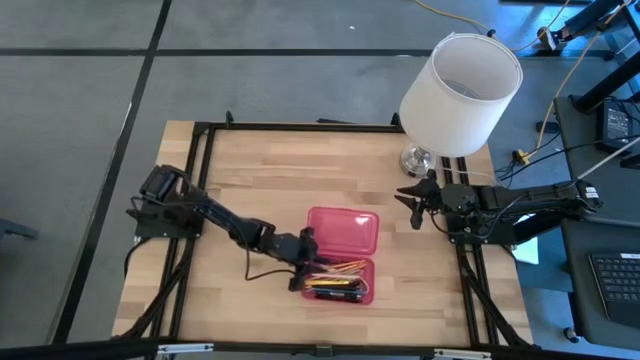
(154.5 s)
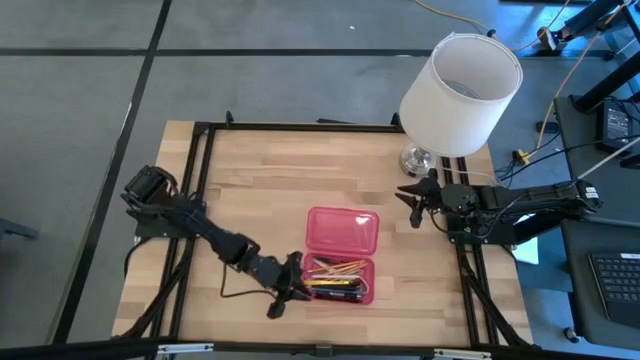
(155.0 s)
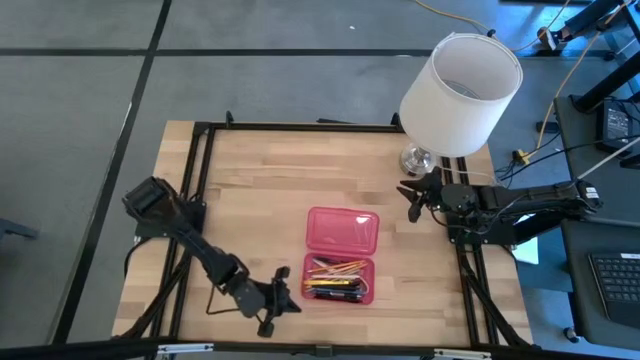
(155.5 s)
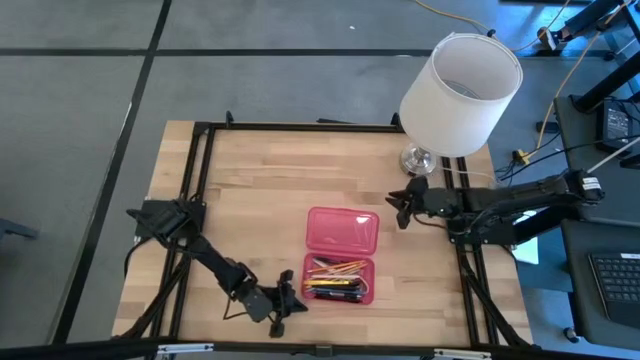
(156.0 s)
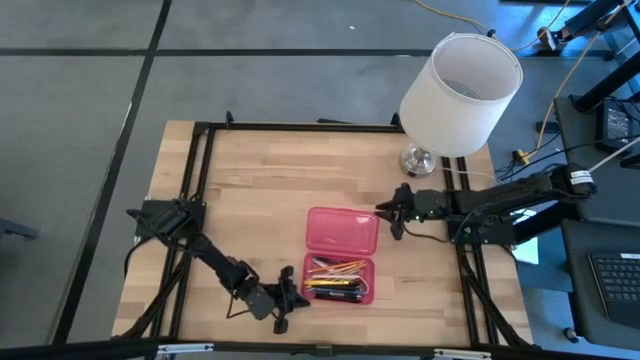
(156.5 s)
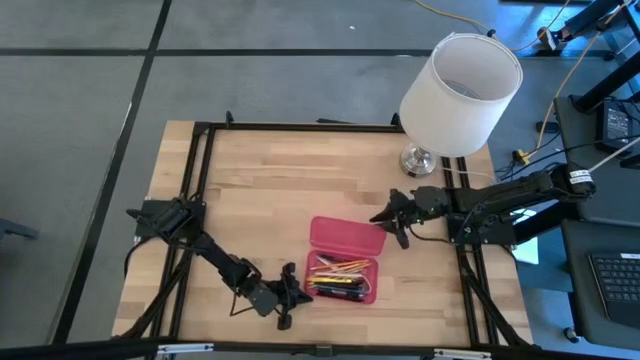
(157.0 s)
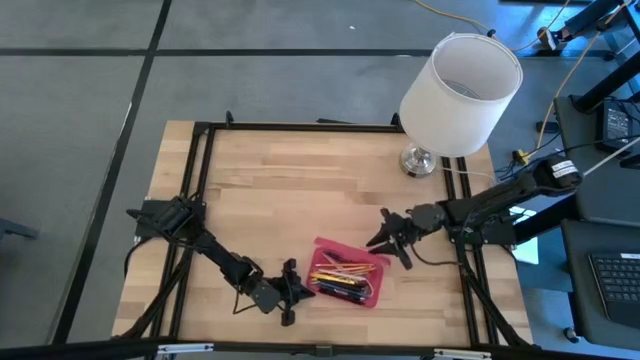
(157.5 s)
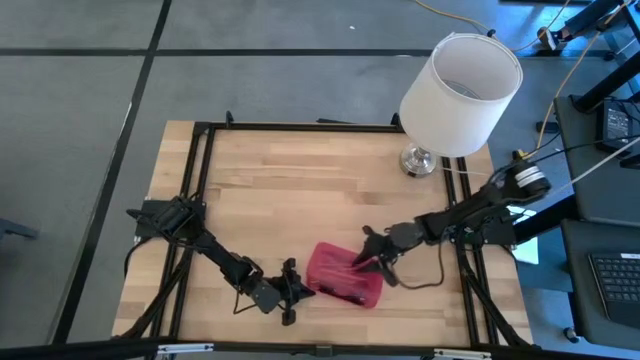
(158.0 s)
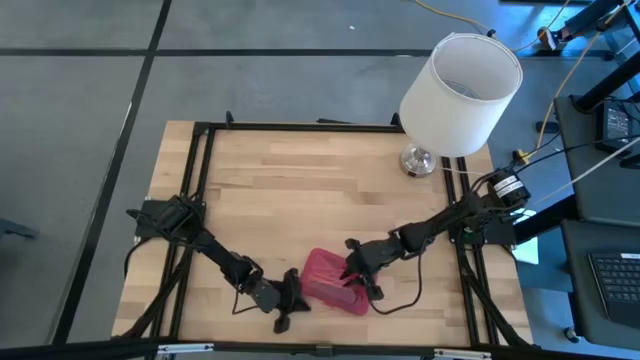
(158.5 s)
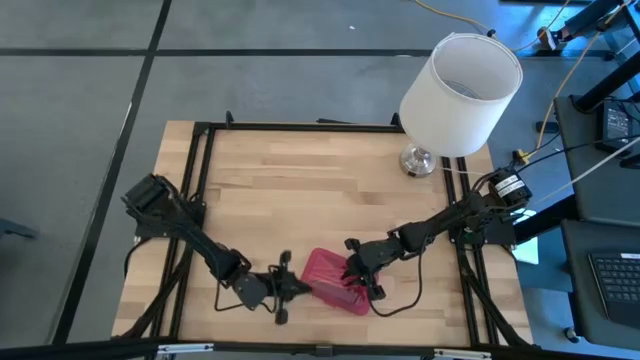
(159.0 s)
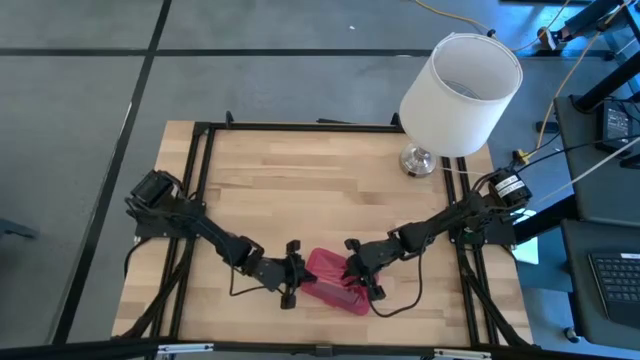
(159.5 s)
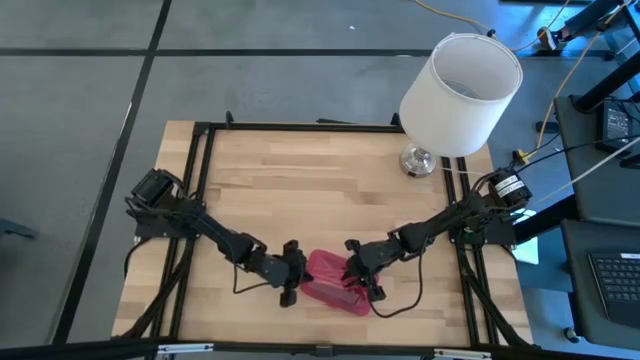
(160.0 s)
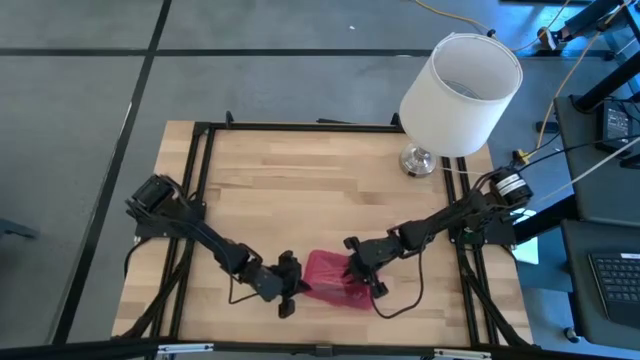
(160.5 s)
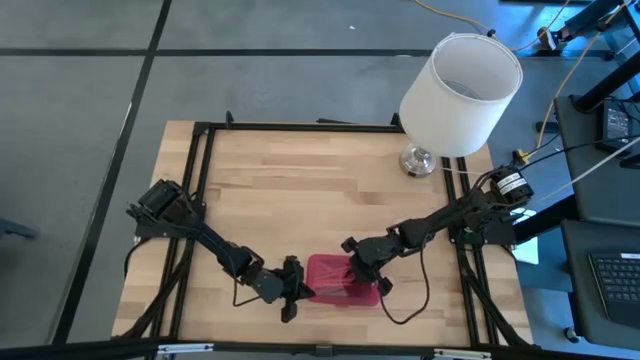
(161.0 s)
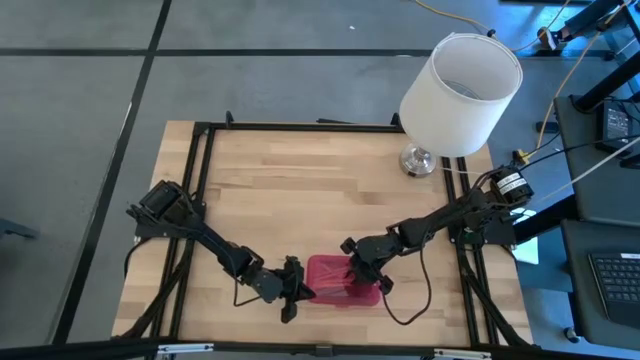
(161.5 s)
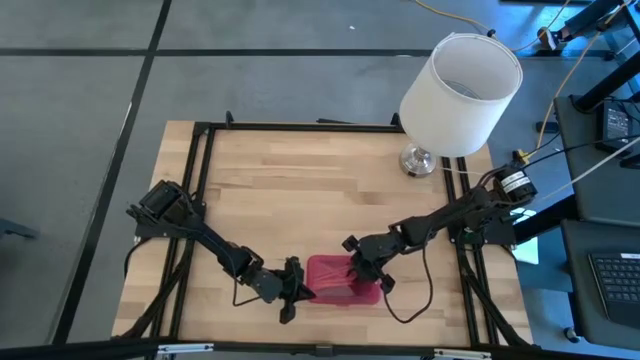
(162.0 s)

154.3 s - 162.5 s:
Task: Pick & place school supplies into a supply box
Close the red supply box

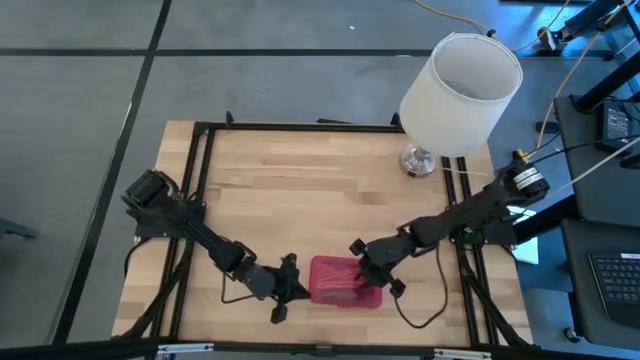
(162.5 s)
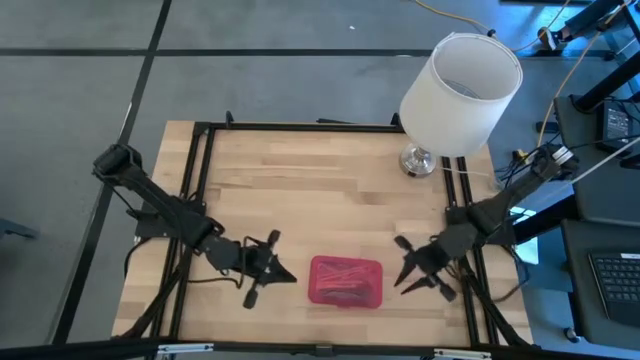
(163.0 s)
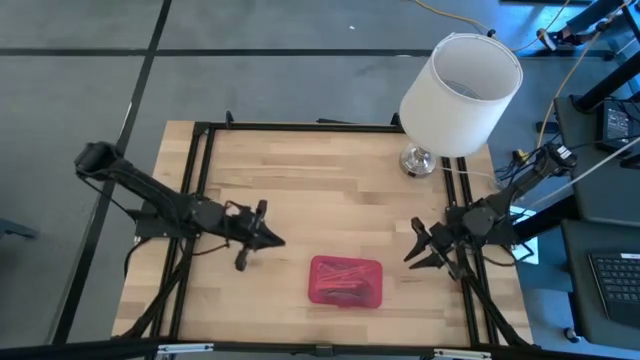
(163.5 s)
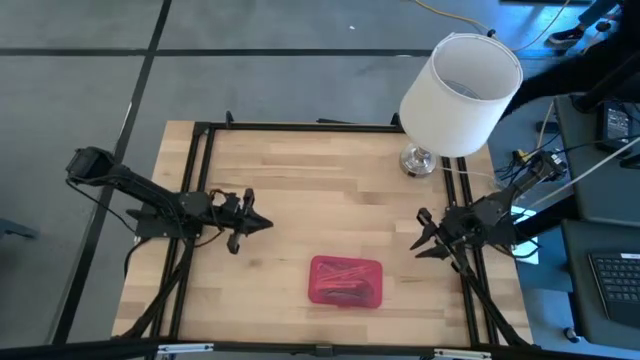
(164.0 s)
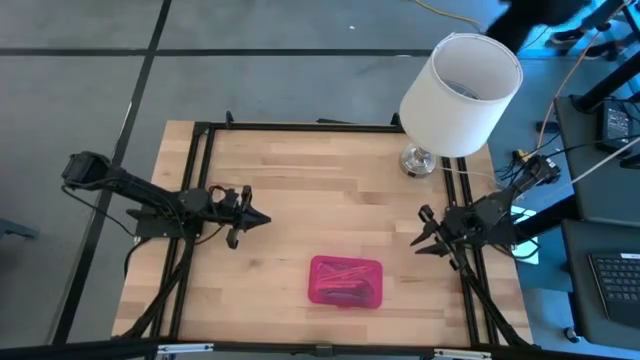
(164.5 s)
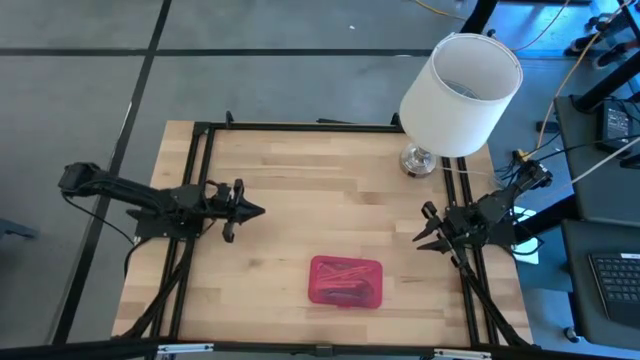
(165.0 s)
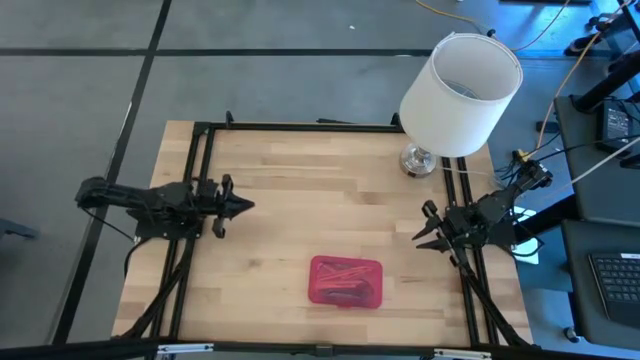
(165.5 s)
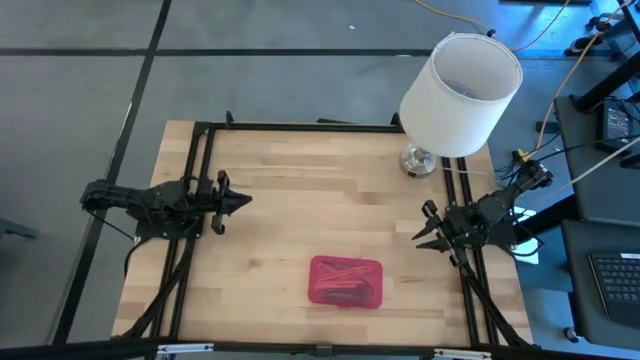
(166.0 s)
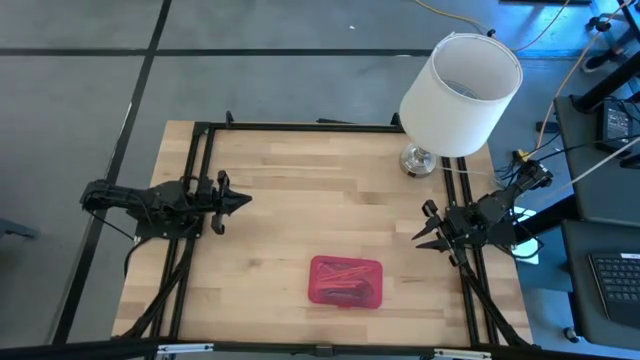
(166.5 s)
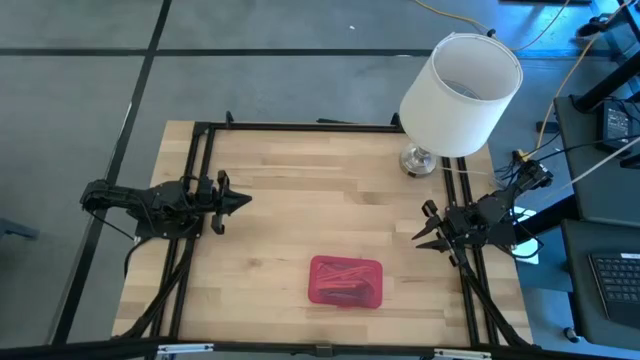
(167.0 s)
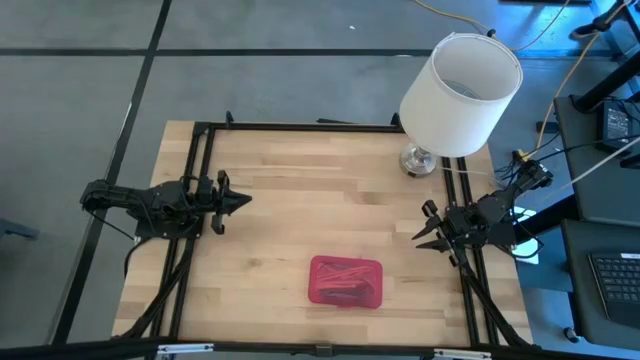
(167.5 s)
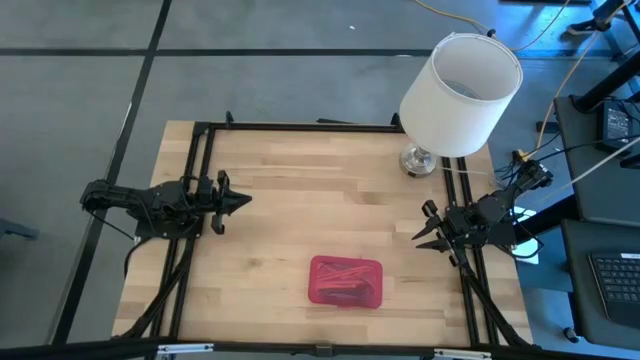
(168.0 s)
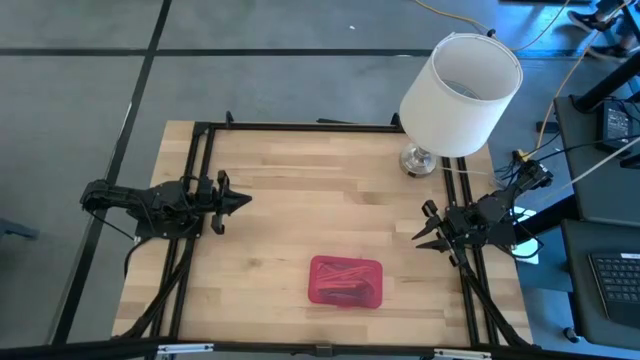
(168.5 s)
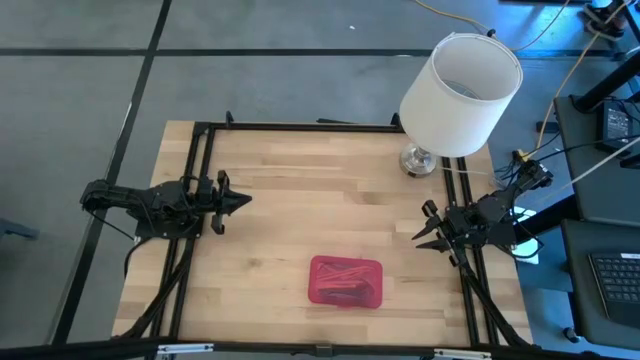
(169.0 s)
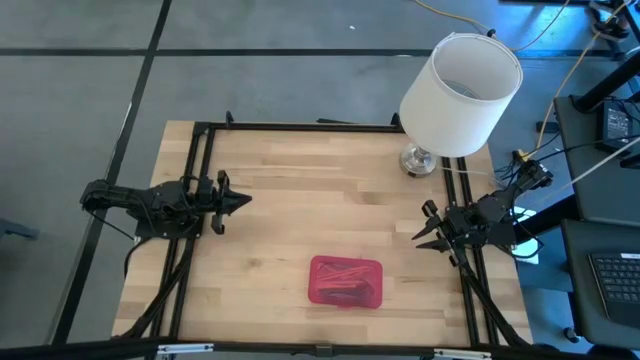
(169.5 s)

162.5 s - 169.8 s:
Return to Home Position

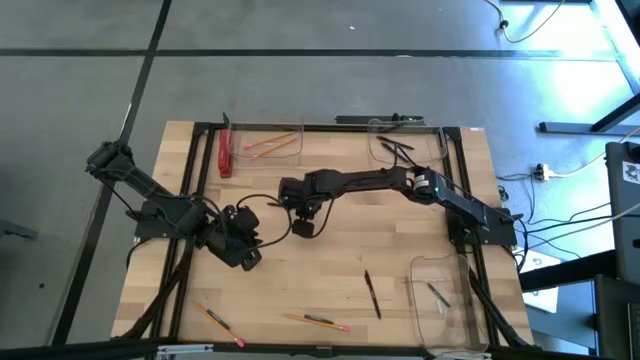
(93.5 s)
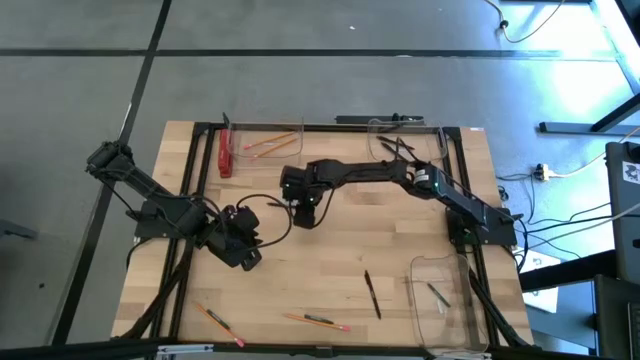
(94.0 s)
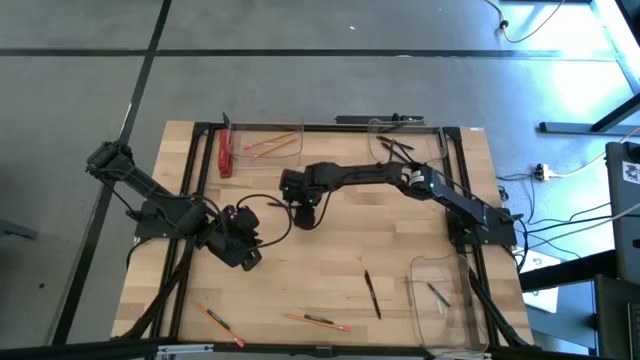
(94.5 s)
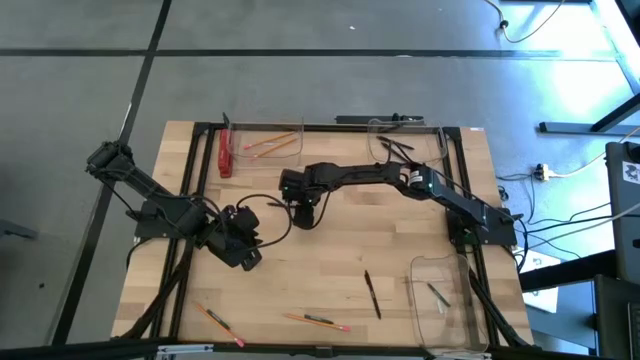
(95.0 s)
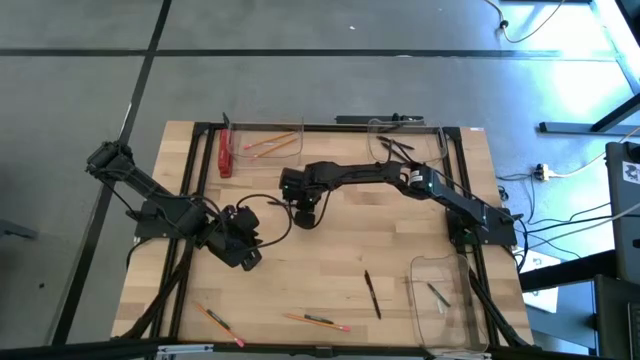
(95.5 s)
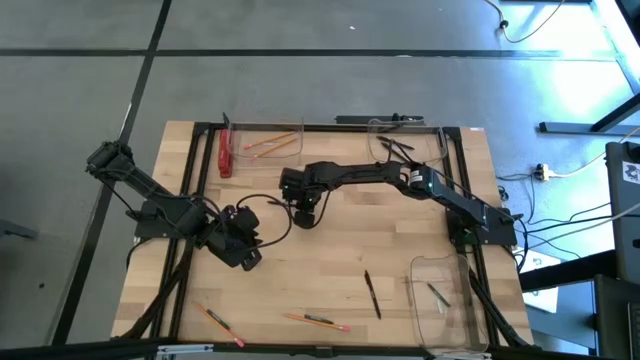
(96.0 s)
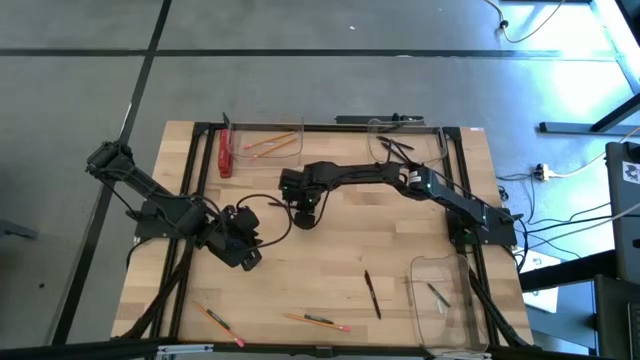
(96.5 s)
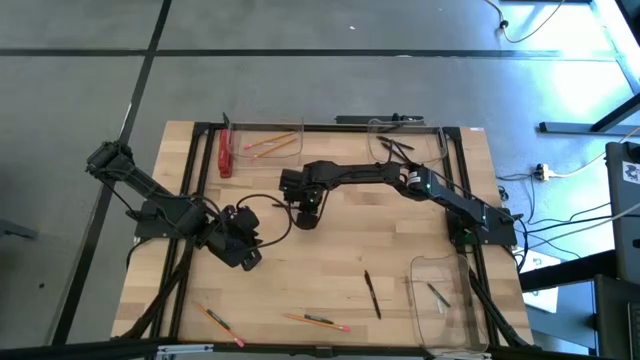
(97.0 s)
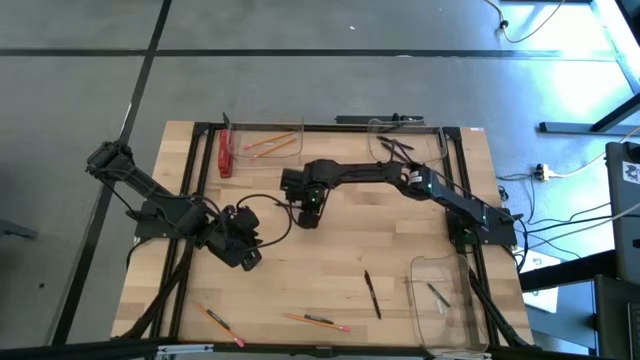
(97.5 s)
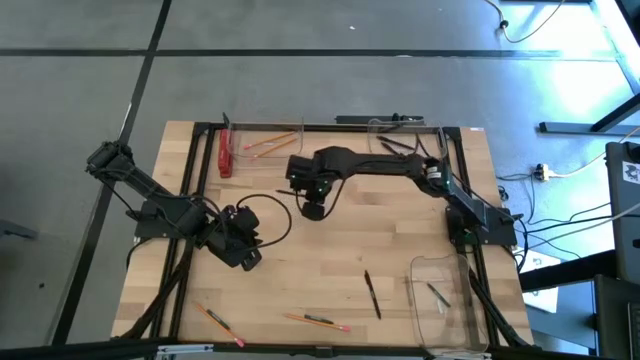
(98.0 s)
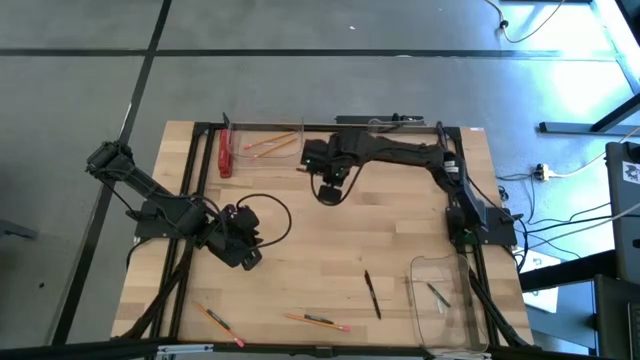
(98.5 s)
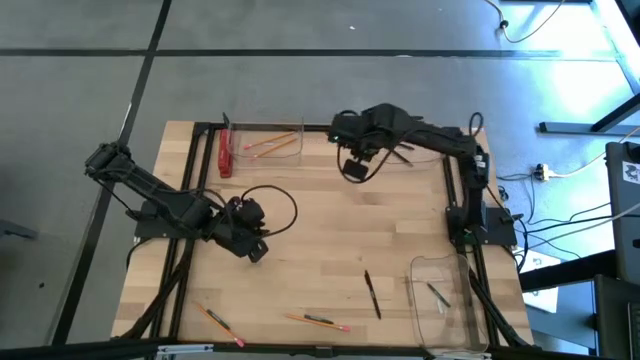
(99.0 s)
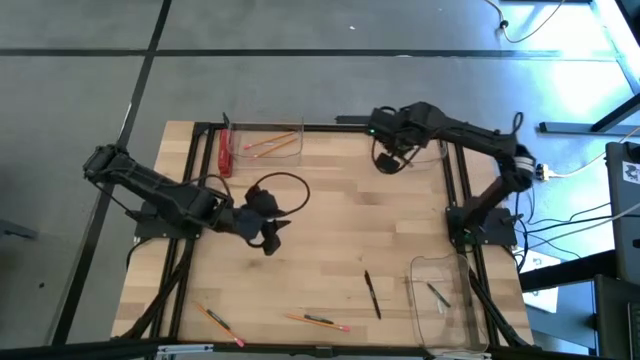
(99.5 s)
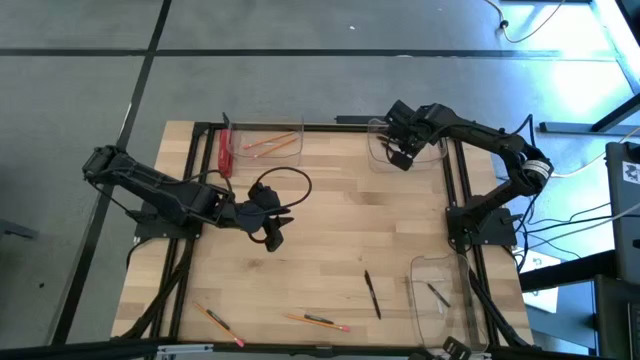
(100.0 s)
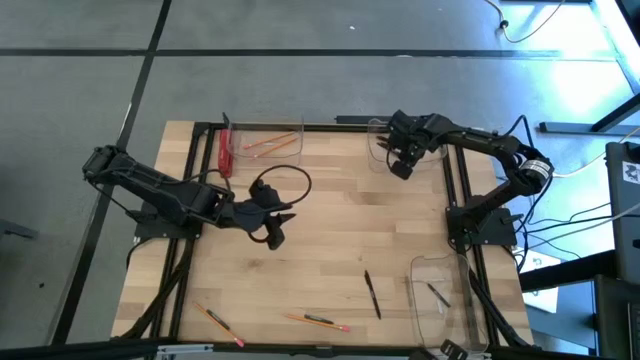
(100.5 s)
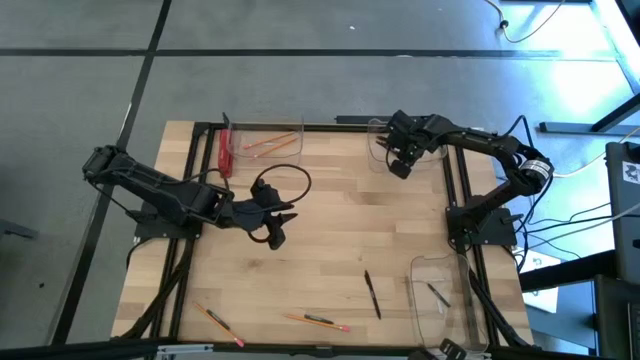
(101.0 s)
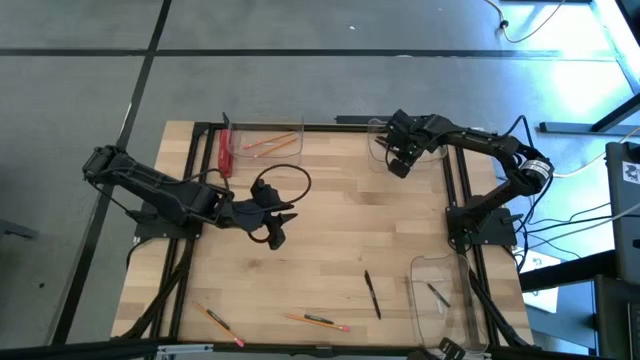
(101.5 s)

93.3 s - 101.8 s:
Task: Sort crayons/erasers/pens/pencils in bins
Put the top black pen into the top right transparent bin
